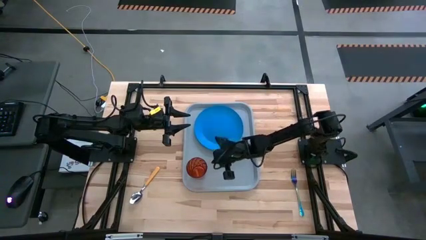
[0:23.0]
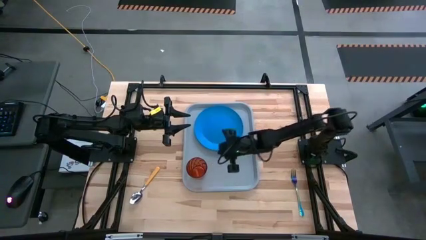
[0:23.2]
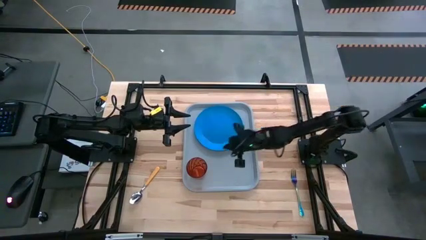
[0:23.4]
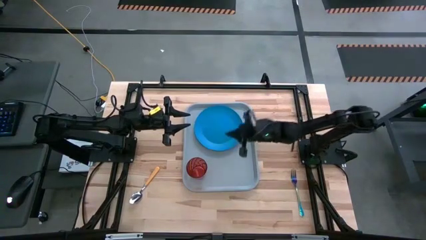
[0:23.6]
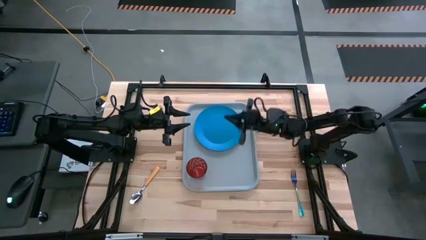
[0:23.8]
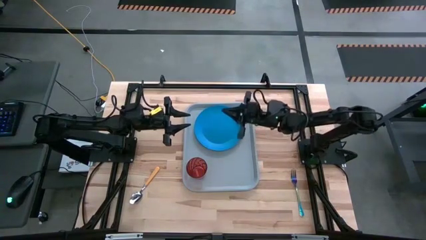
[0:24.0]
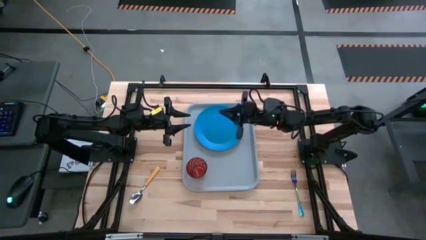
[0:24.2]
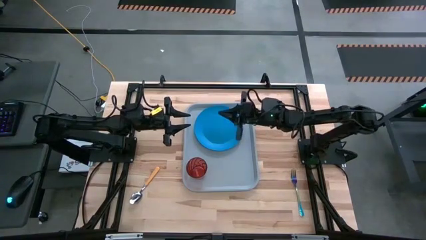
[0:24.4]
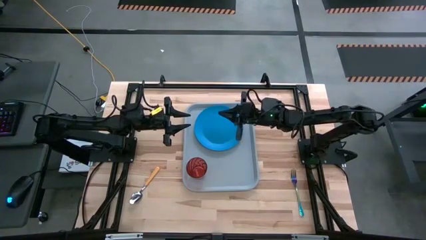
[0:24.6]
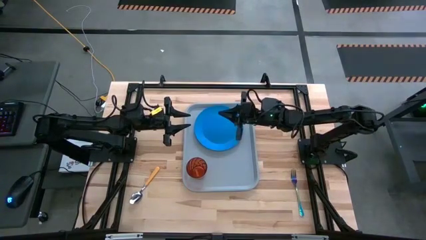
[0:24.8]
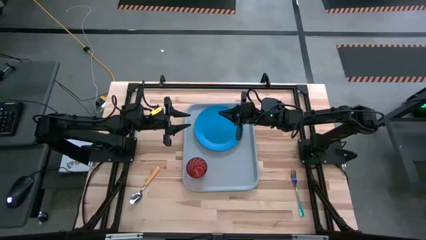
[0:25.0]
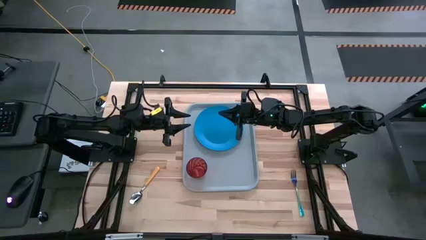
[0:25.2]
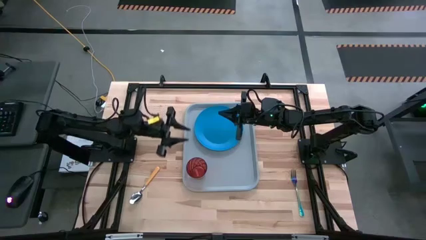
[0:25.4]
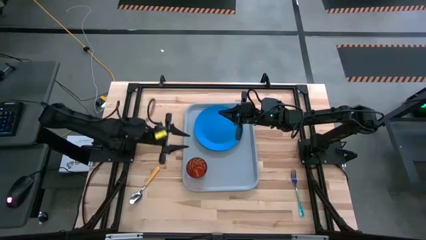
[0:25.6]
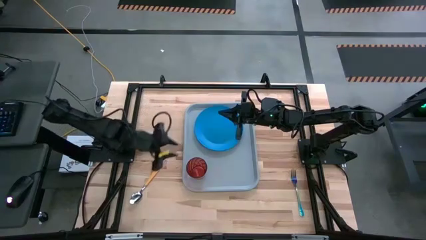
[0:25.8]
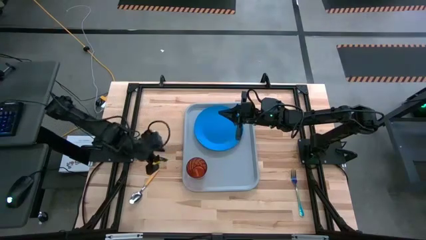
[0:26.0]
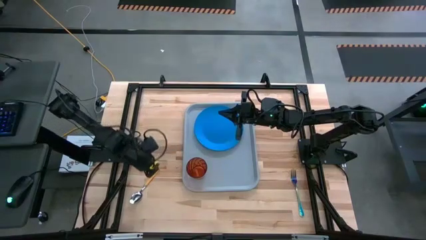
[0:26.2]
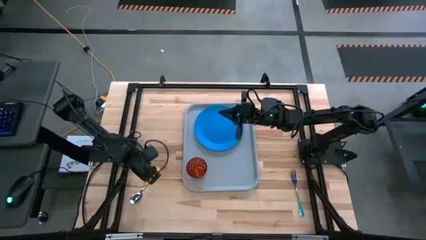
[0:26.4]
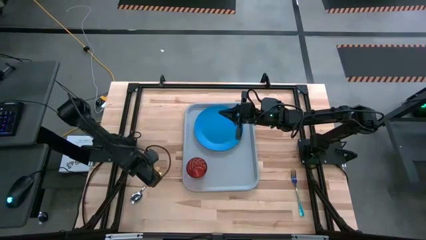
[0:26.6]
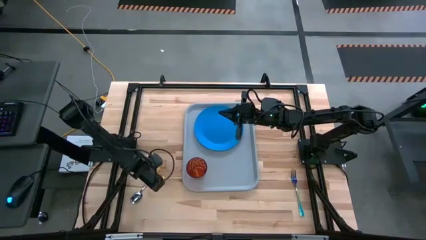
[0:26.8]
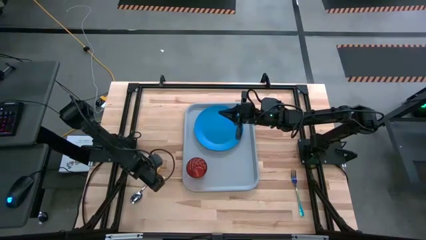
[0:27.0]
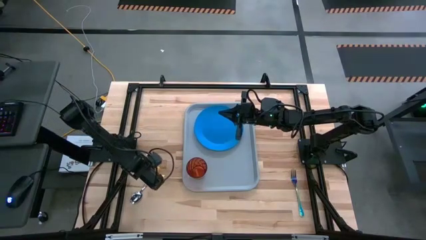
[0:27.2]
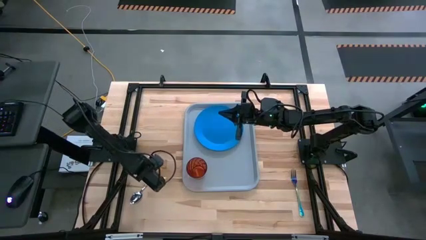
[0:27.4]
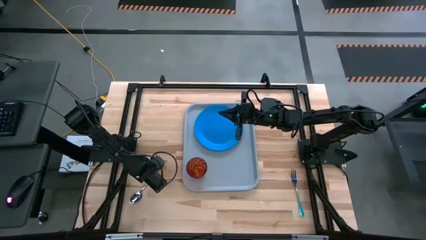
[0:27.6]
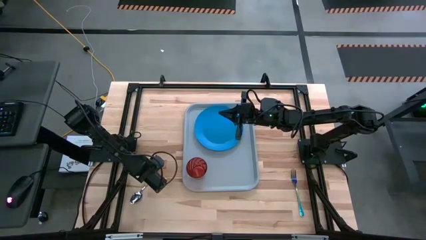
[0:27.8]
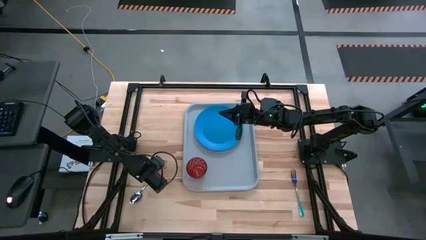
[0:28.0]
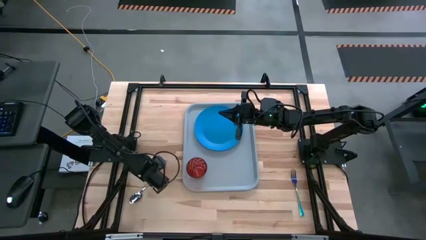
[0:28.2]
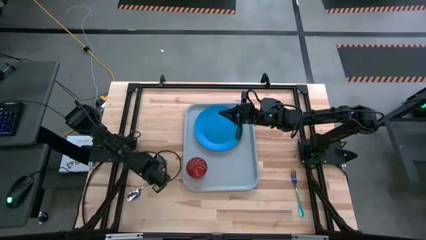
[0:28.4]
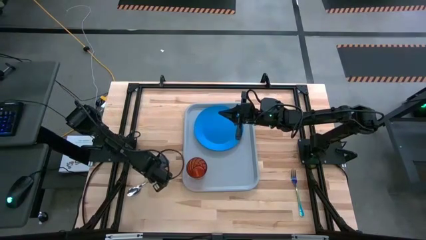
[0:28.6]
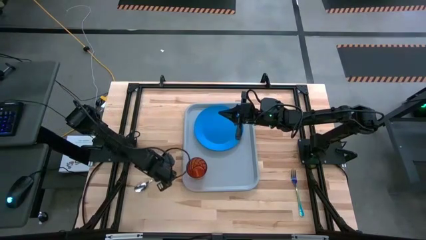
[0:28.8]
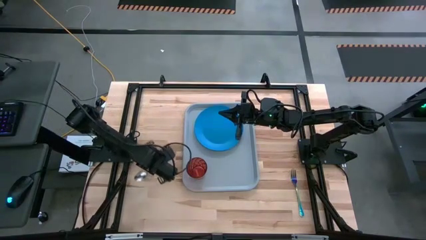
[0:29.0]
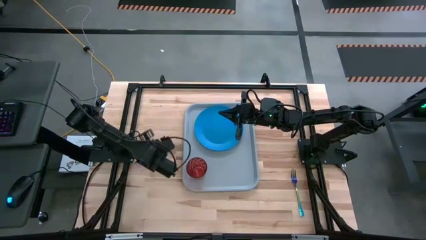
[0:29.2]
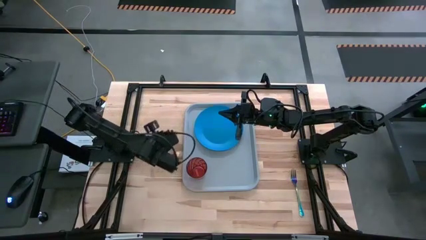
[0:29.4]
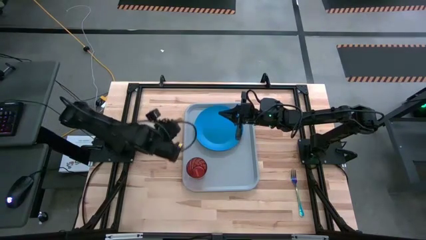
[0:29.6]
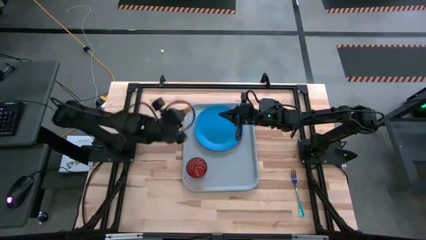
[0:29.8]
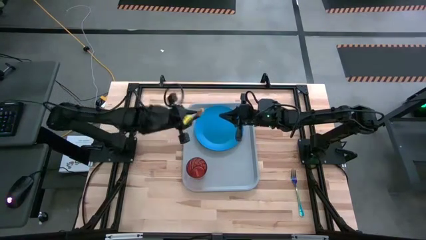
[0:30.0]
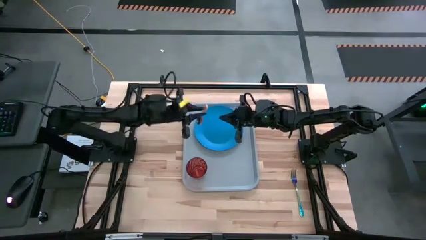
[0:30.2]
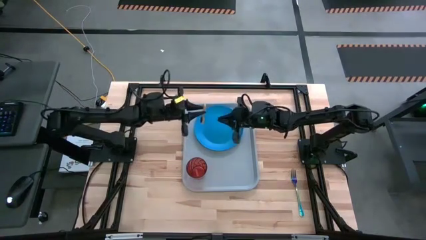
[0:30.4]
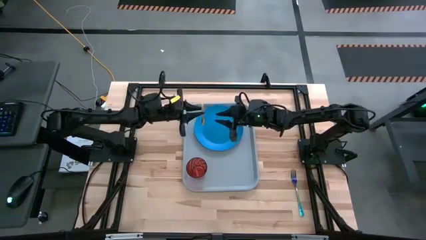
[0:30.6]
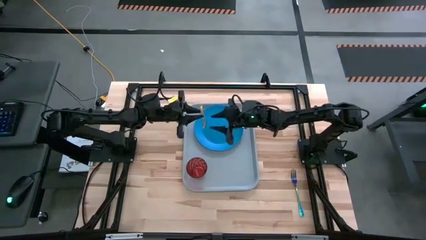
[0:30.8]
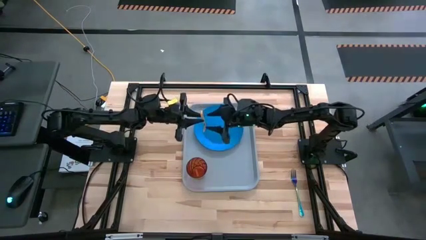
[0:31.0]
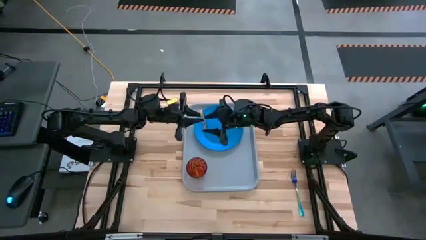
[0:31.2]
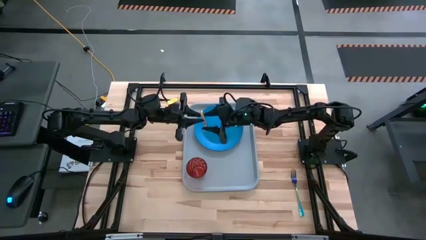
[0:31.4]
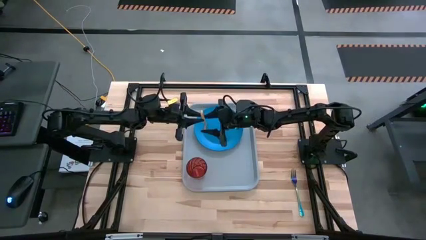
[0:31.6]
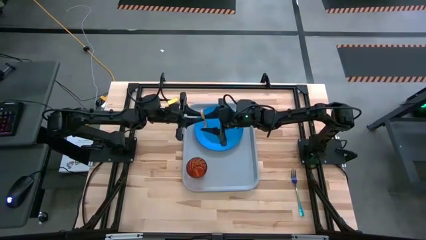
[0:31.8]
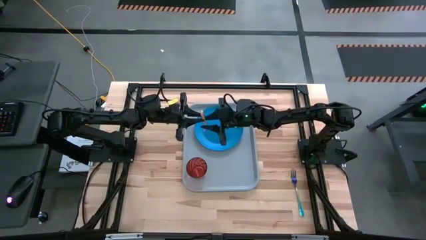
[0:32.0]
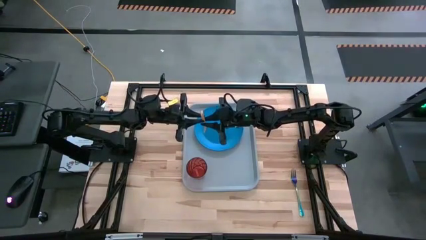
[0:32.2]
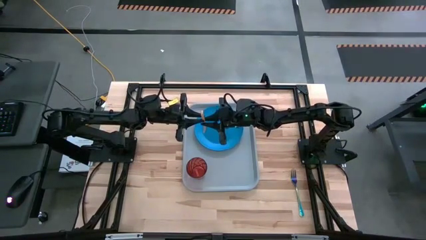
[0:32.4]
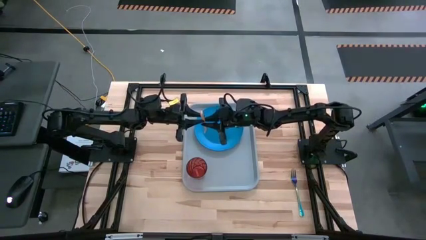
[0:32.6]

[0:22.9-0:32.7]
Task: Pick and place plate/cup/fork/spoon on tray
Put the yellow spoon on the gray serving tray to the left of the blue plate

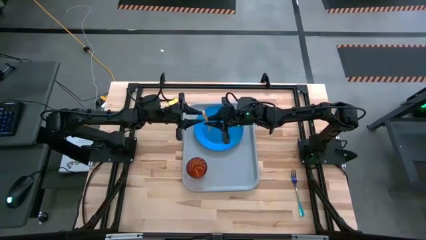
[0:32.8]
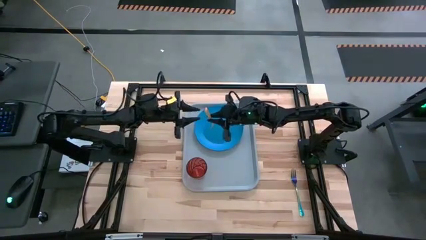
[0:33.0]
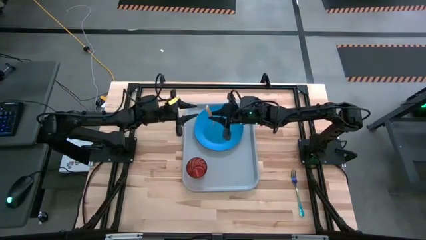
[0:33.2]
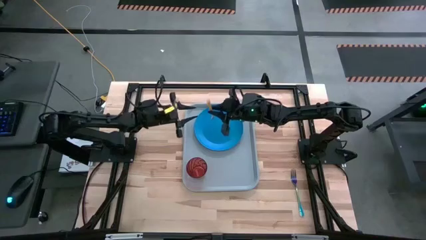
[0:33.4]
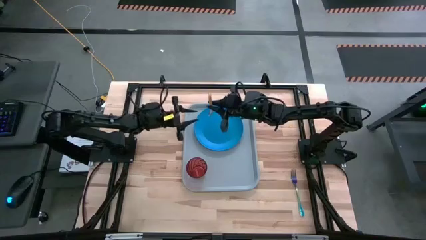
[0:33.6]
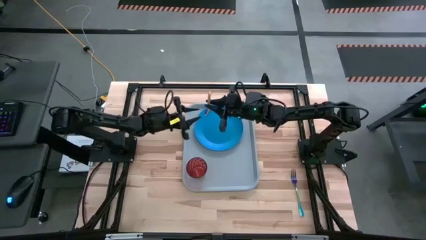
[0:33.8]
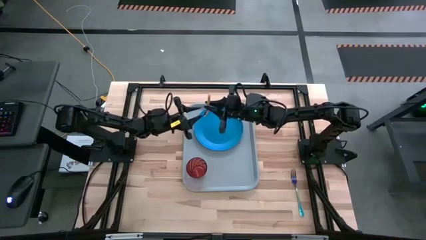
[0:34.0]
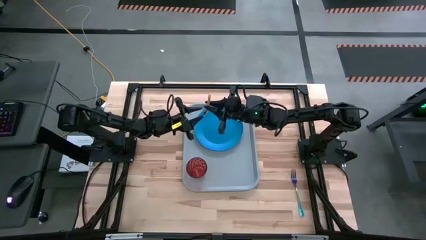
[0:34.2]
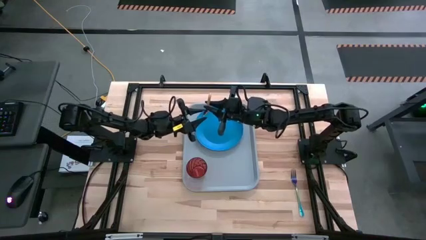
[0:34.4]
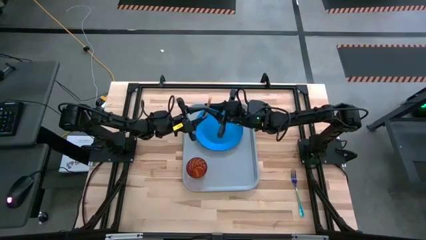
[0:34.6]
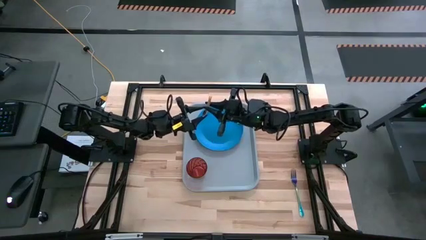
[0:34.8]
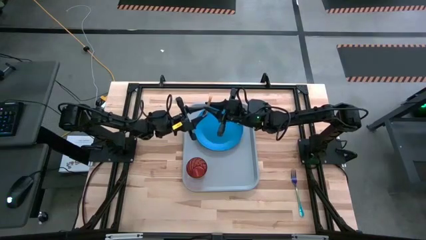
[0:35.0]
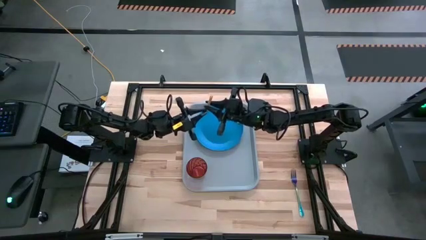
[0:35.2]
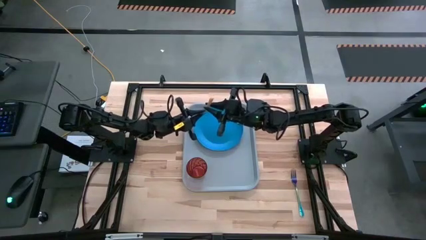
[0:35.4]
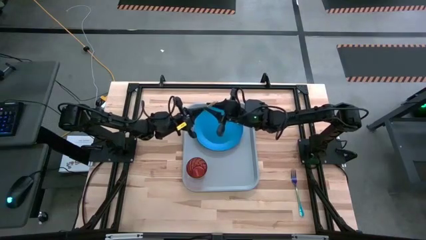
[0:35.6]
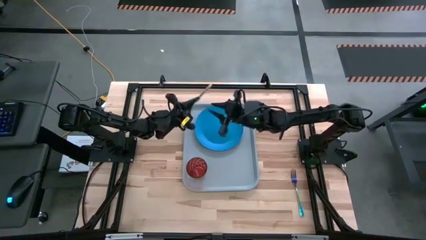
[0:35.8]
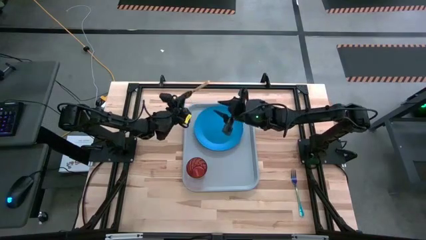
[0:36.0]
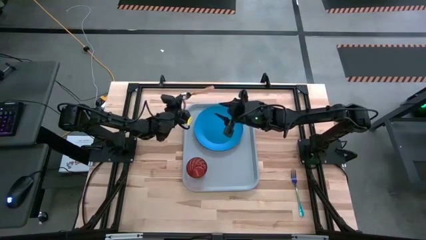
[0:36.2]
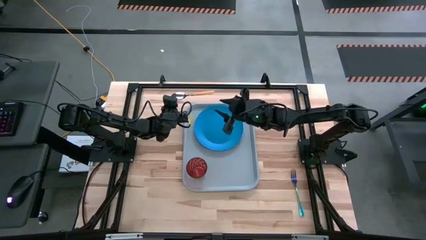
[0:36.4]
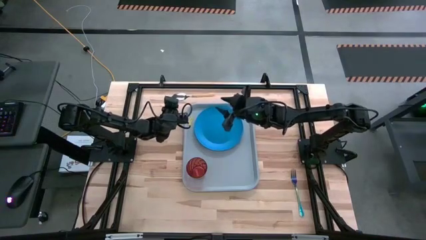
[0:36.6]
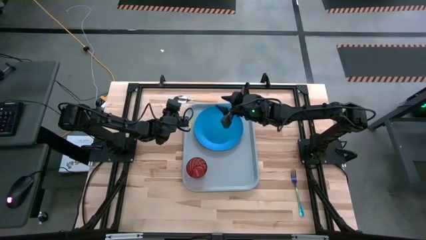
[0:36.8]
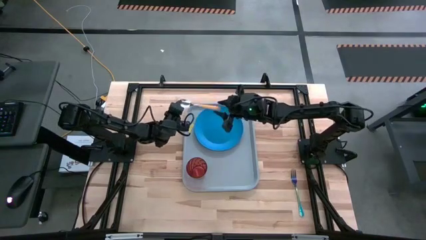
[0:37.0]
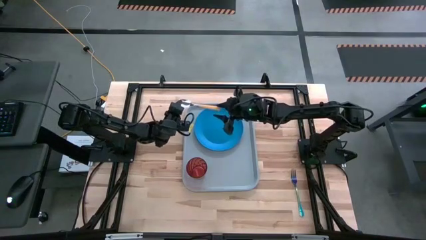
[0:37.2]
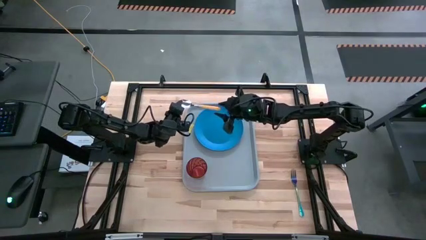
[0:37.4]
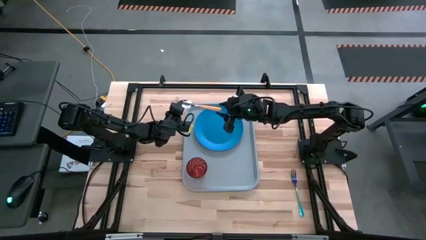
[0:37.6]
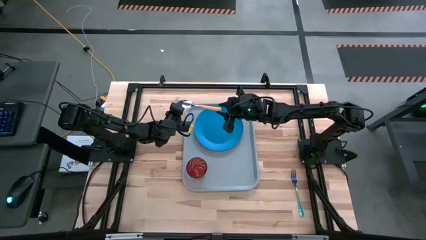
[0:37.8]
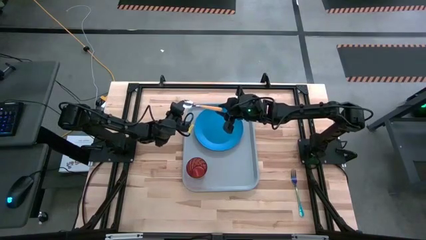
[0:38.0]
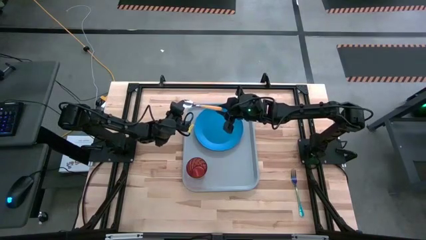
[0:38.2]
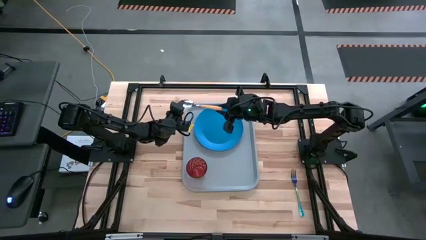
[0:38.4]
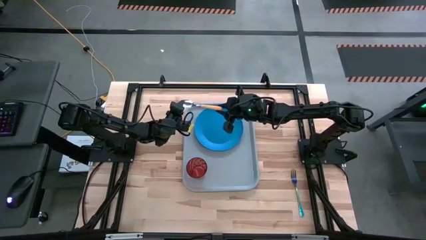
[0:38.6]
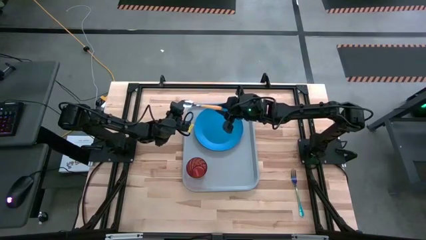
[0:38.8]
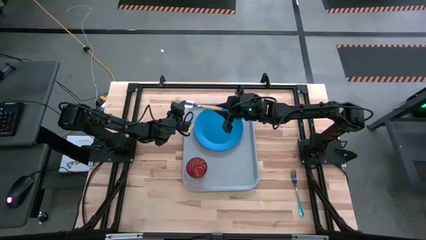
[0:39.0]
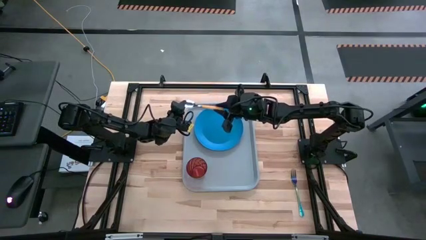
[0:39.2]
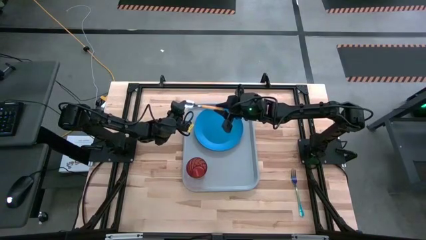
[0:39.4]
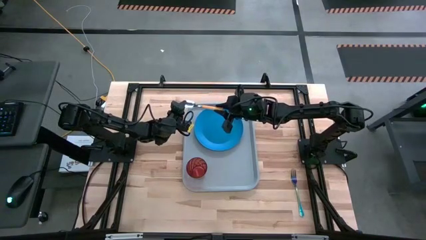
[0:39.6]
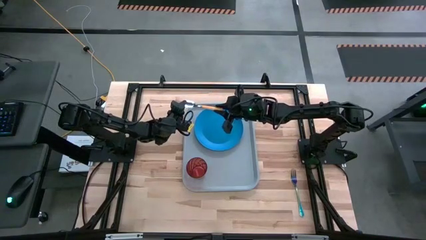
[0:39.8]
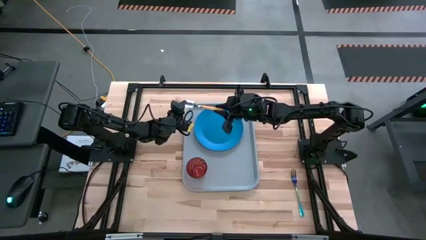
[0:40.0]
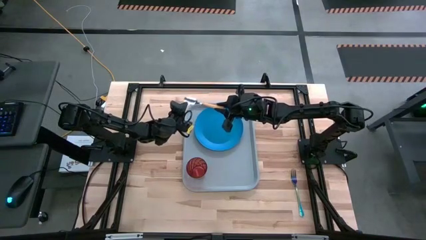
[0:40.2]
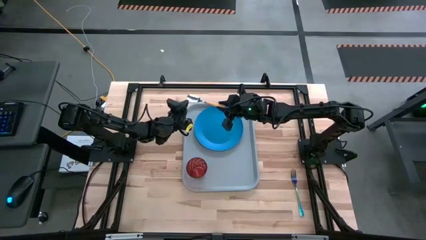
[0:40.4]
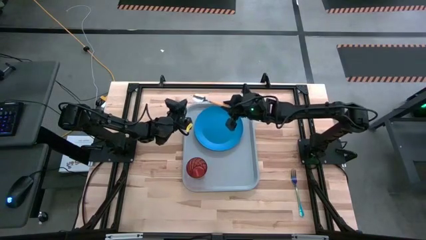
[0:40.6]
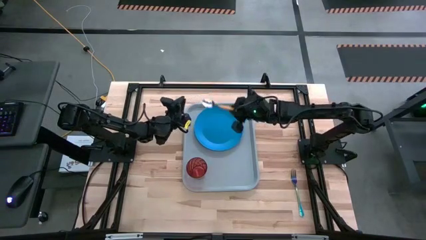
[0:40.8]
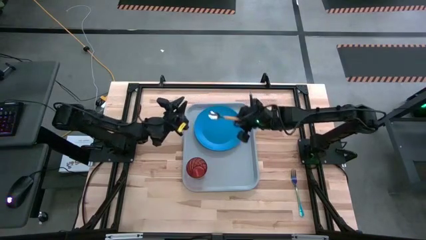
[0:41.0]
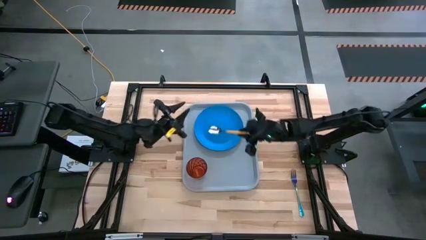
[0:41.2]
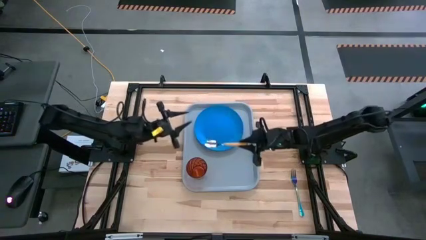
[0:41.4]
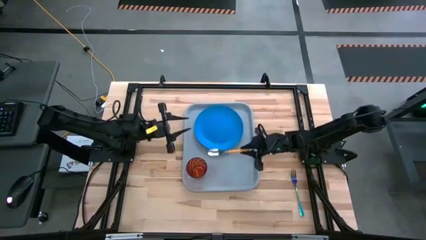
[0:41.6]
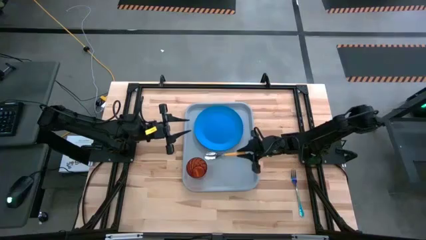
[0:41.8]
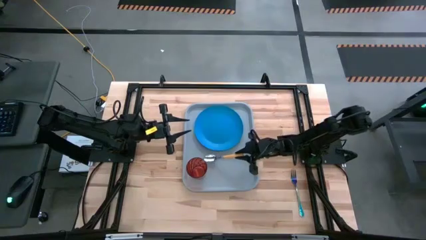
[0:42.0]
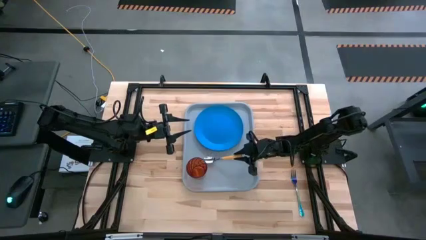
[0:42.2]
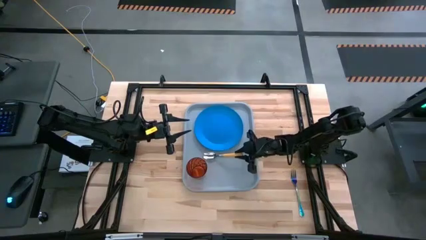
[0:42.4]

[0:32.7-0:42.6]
Put the yellow spoon on the gray serving tray to the left of the blue plate
